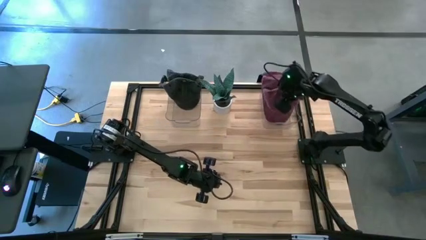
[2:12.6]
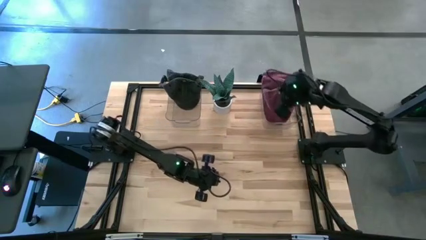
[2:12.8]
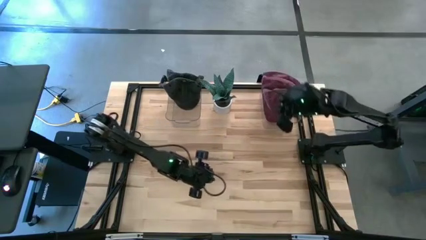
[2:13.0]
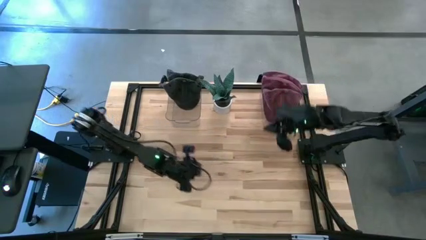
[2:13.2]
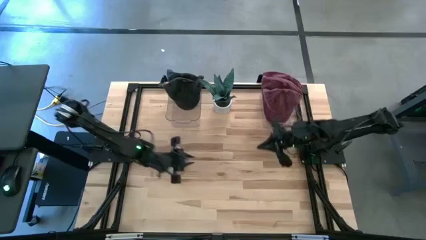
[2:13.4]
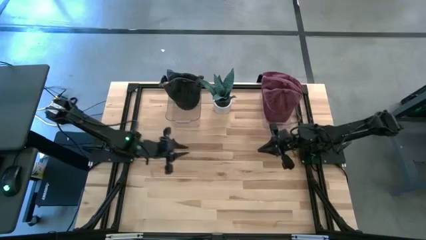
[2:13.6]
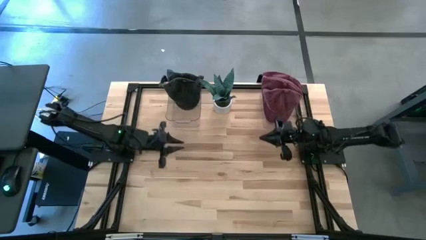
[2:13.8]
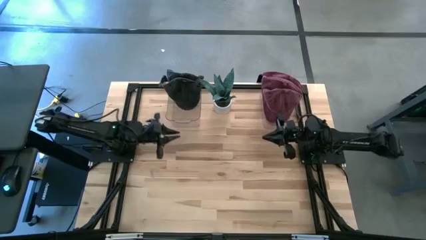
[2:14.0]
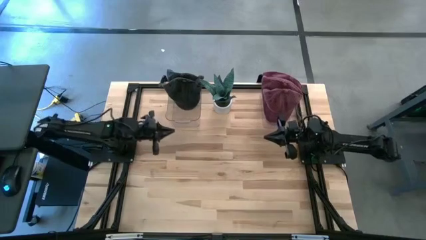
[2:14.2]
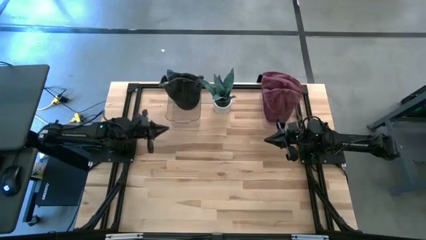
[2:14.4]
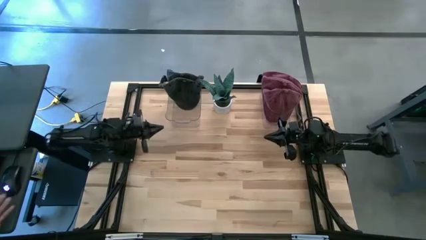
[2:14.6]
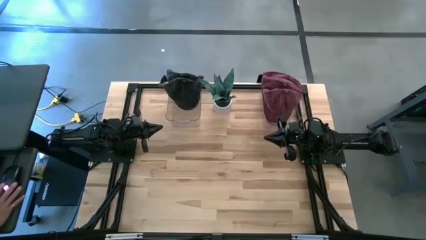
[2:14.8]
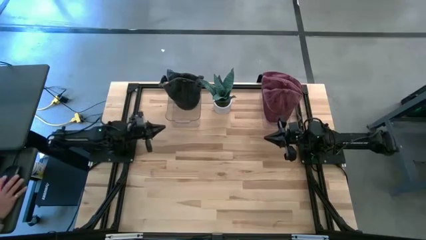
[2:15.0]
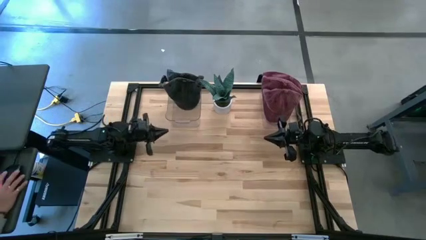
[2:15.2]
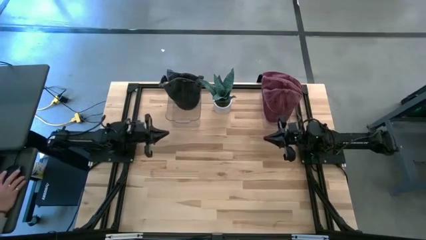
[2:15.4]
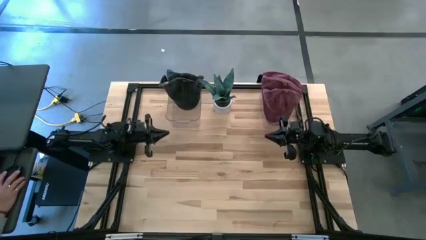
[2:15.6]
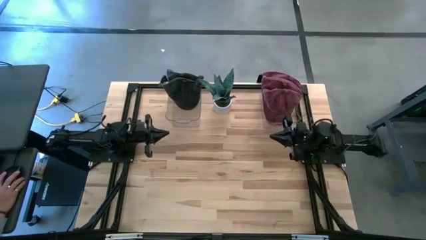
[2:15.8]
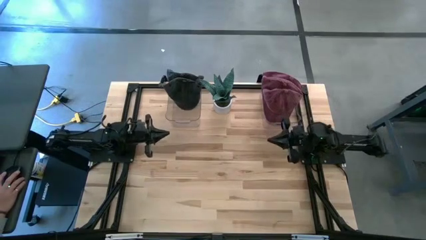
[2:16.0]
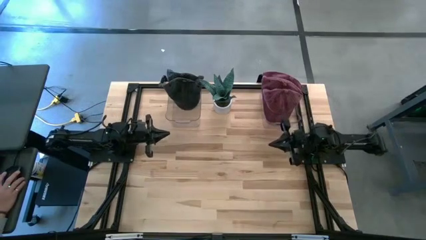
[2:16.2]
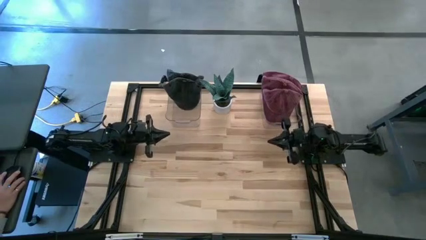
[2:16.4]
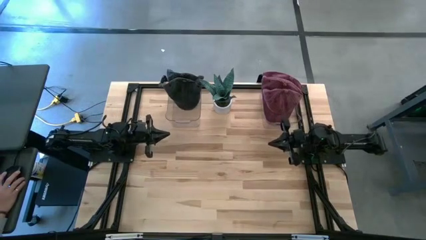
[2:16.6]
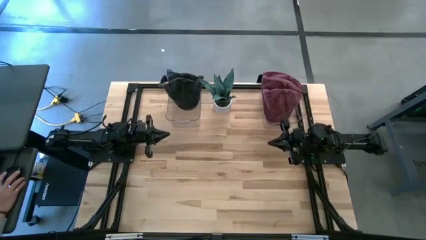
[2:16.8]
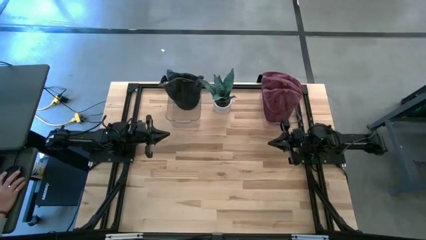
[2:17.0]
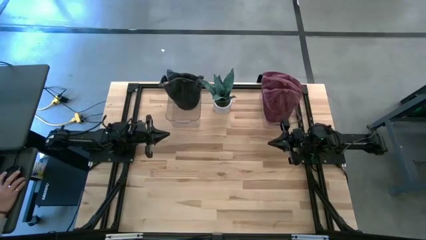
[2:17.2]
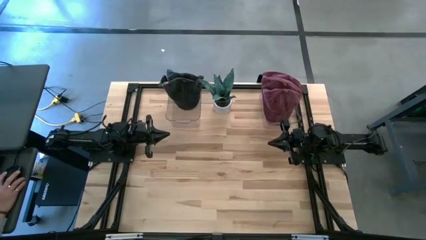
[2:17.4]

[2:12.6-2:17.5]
Task: Pick & Place hat
Return to Home Position

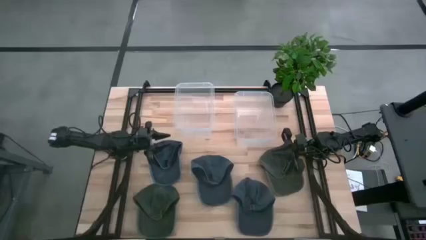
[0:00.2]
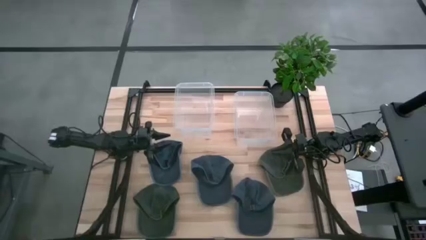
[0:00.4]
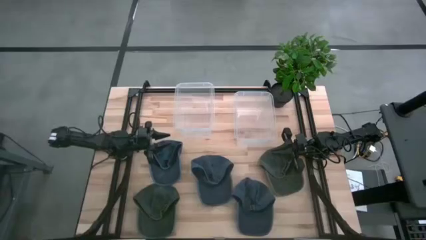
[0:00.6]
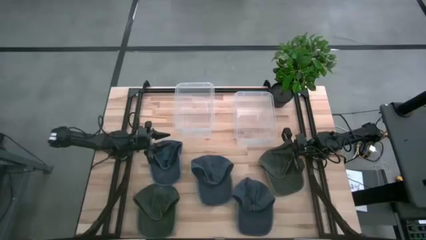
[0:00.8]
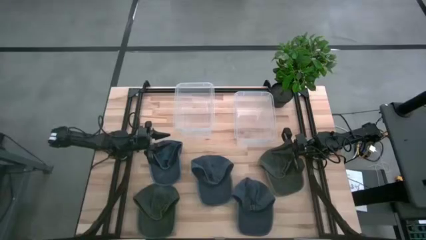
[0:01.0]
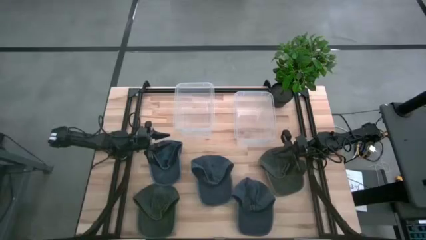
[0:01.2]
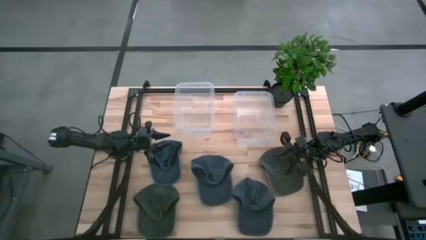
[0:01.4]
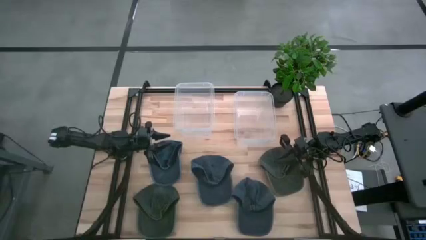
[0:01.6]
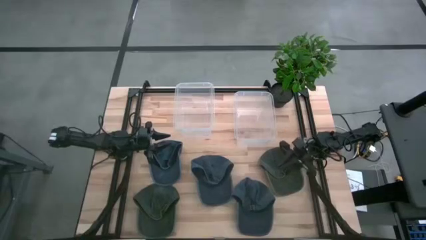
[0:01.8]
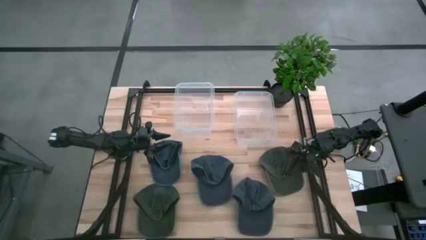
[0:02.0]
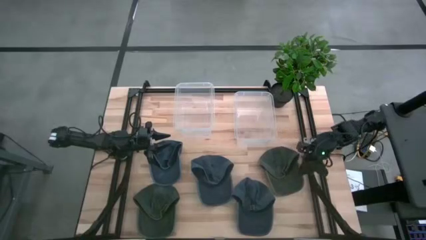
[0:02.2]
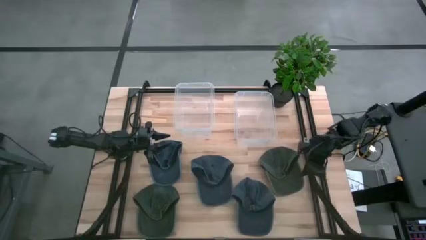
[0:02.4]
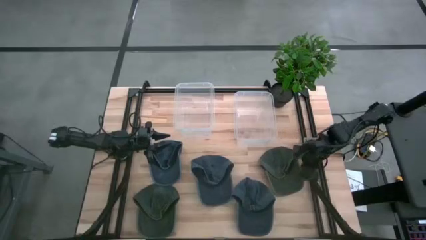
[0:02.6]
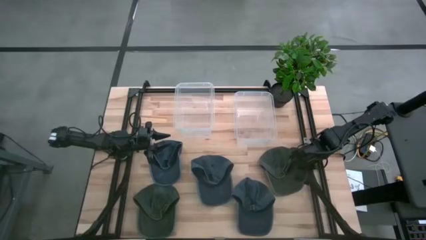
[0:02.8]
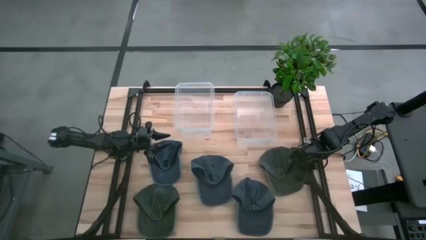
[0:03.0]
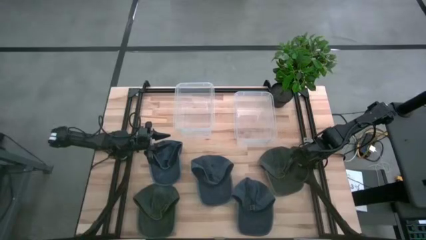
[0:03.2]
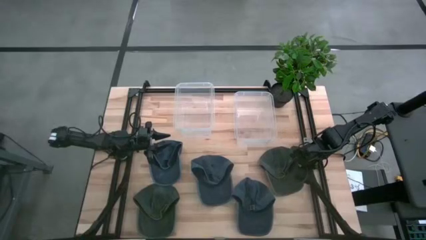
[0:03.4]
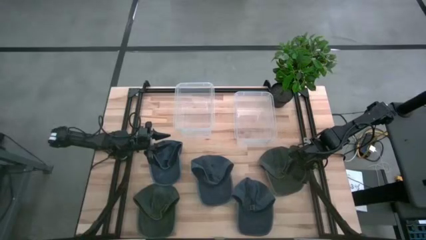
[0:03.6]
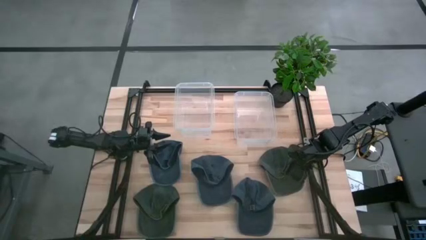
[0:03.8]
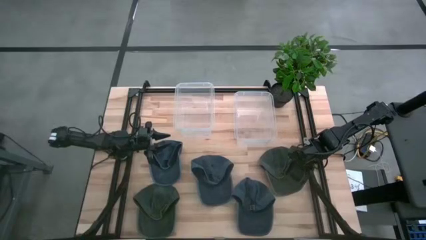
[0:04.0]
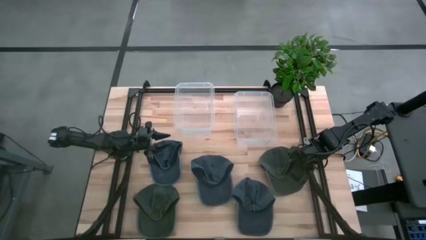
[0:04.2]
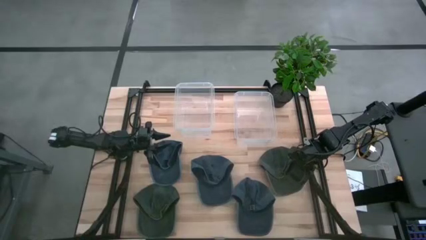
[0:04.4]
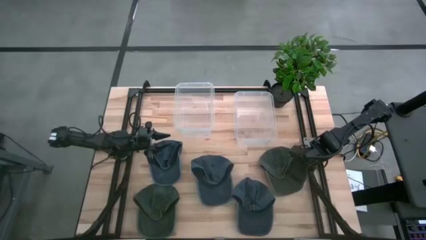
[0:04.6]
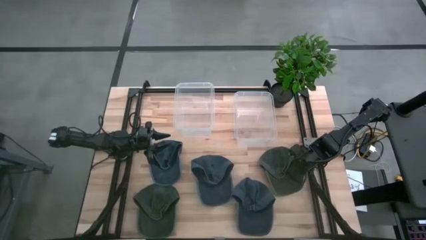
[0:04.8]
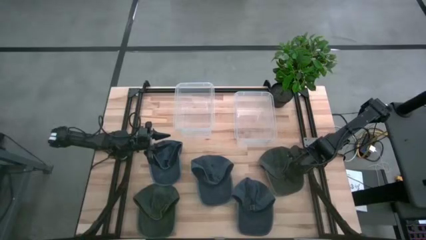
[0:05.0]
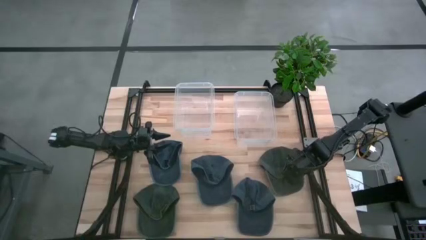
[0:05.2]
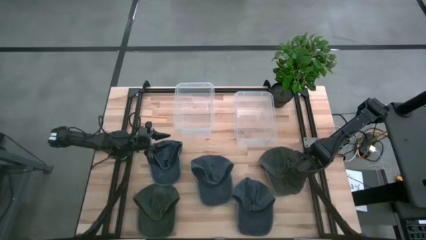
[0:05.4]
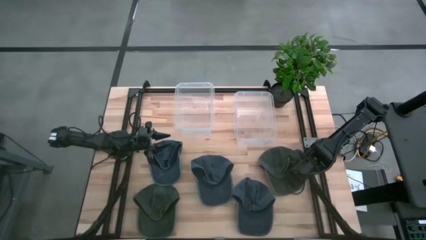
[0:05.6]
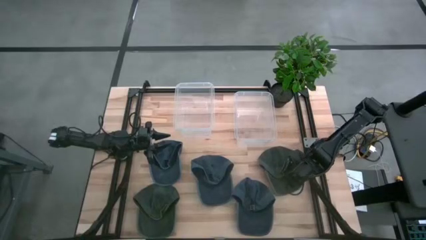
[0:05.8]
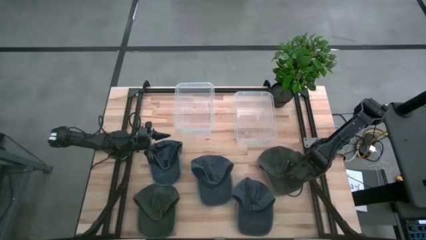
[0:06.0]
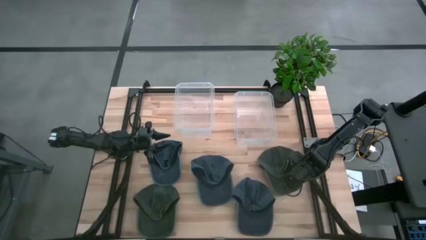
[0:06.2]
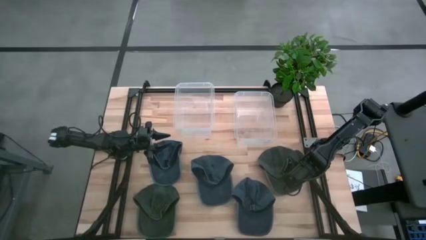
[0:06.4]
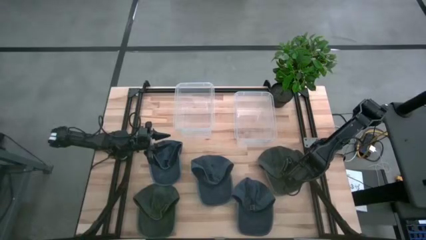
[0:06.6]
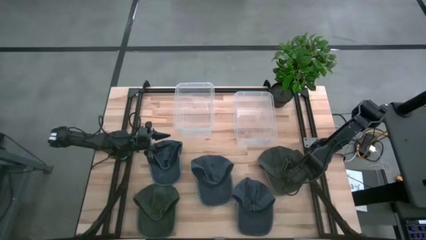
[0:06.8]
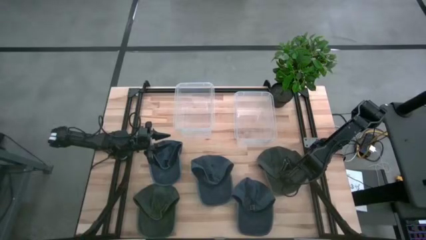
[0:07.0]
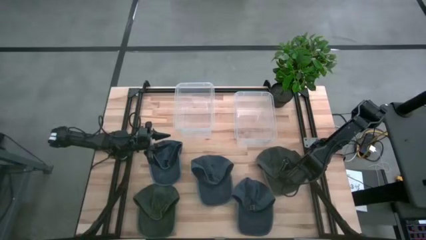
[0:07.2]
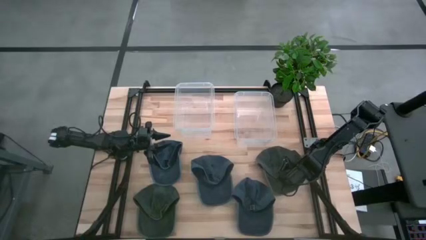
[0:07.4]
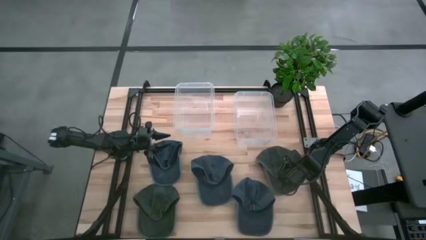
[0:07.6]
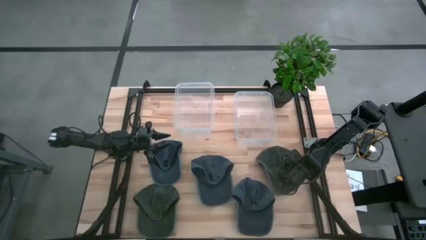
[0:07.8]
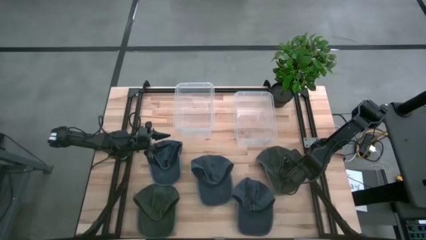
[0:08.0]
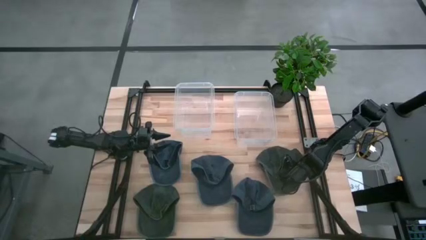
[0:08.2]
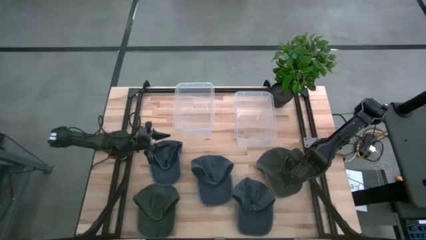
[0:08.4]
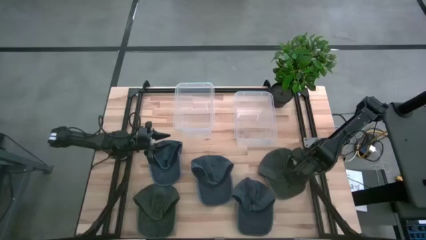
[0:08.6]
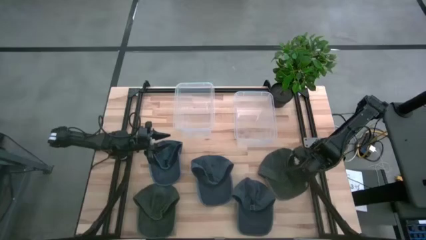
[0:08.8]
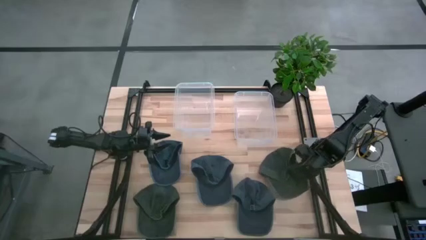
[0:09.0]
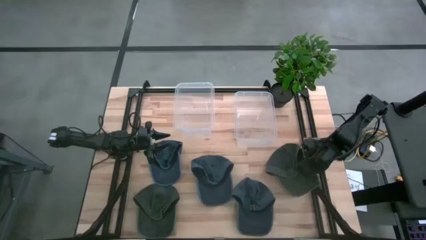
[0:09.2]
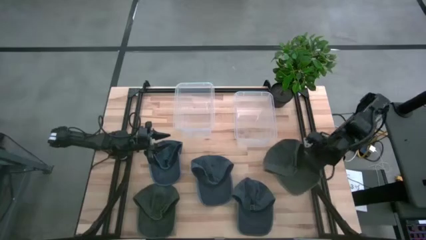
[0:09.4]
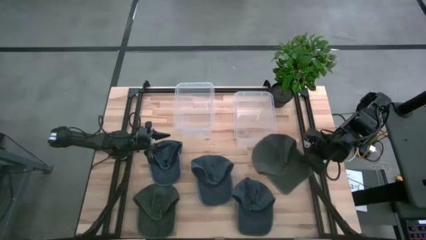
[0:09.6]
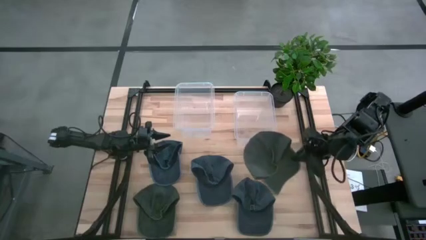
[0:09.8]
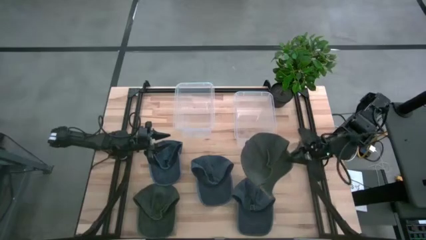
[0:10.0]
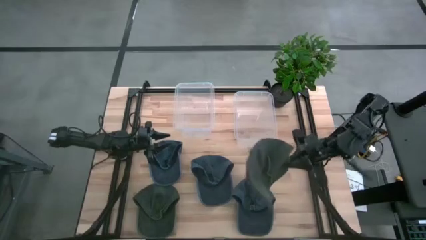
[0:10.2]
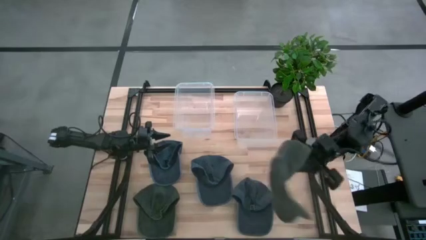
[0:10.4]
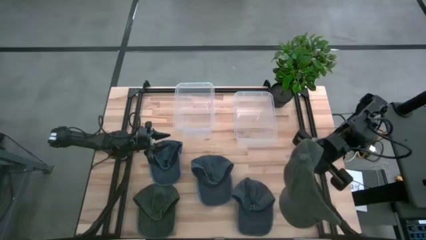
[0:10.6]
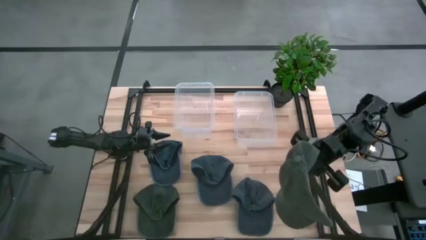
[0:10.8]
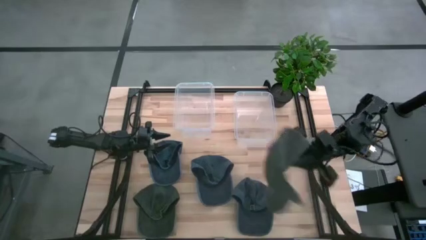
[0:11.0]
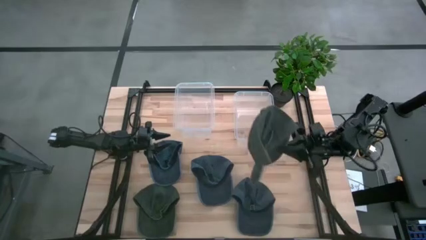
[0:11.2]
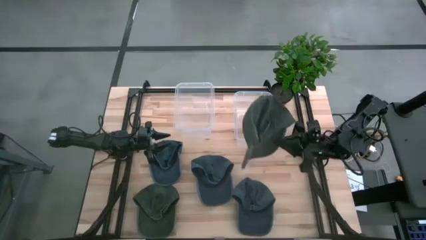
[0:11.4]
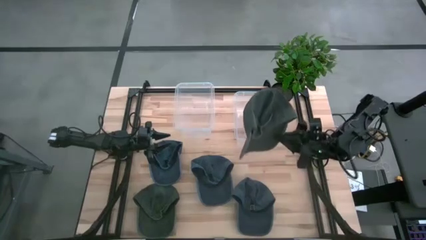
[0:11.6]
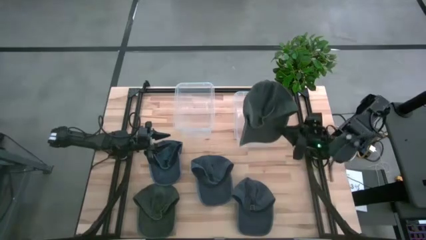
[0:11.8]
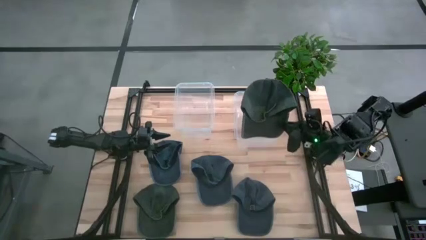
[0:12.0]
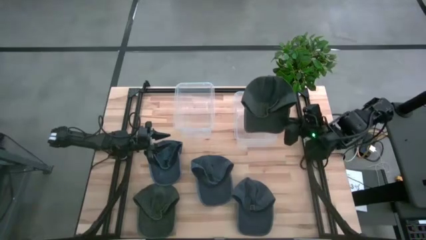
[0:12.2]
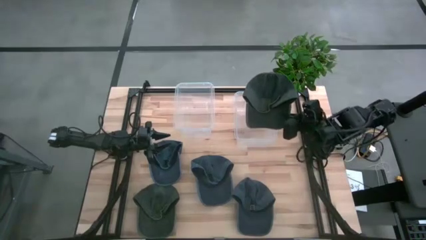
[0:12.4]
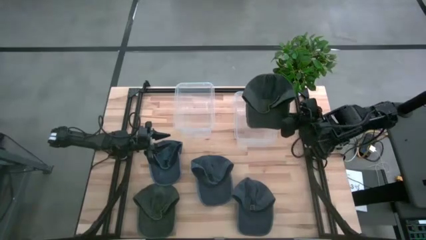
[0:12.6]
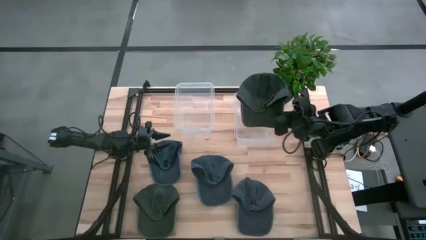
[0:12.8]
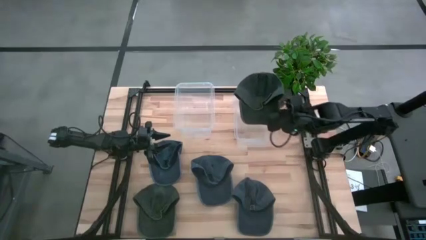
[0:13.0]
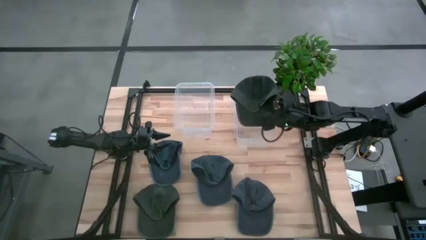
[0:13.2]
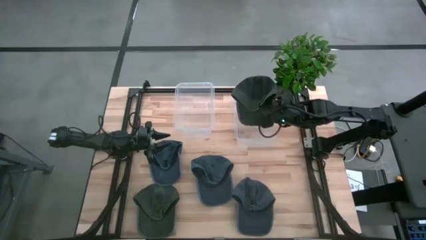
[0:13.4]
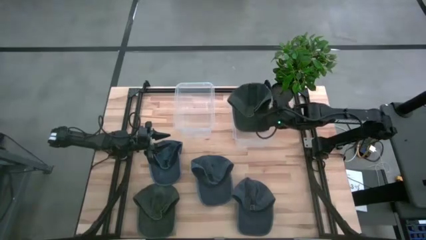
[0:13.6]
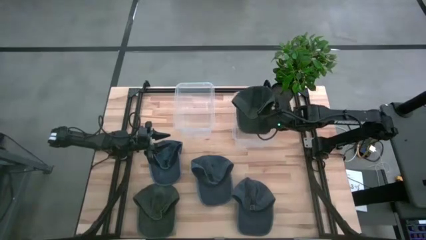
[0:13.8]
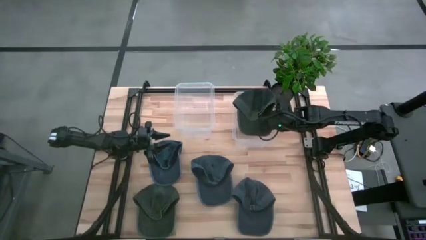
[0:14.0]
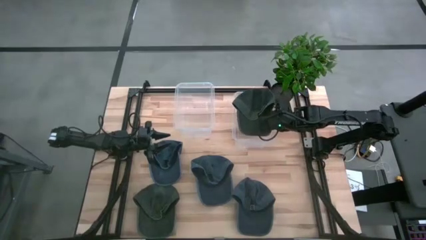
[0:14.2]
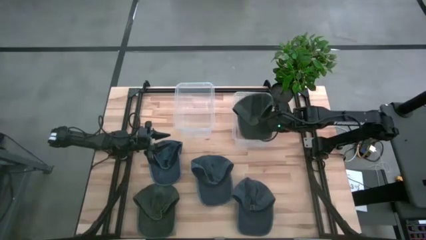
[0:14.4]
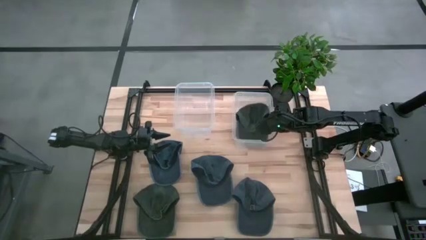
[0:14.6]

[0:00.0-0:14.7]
Task: Pick & Place hat
Put the right green cap into the right transparent bin
